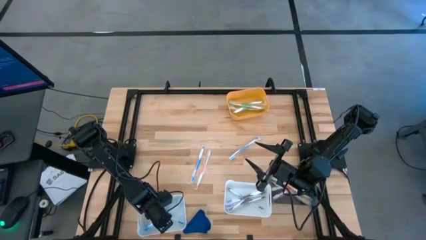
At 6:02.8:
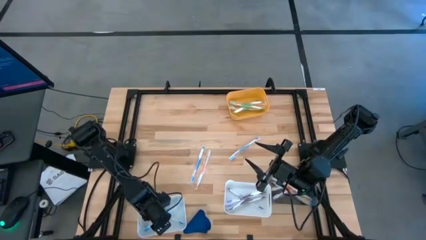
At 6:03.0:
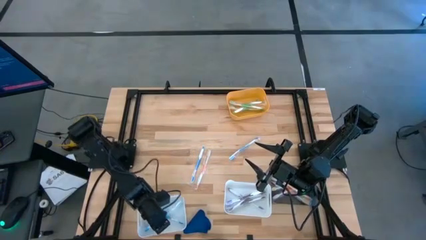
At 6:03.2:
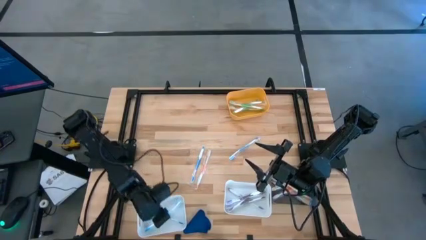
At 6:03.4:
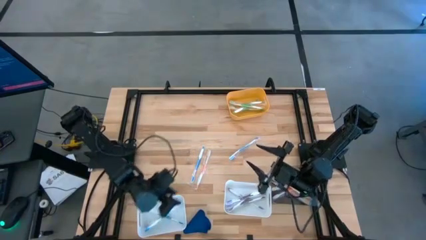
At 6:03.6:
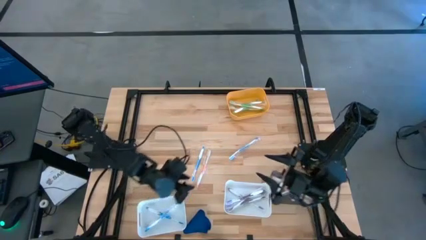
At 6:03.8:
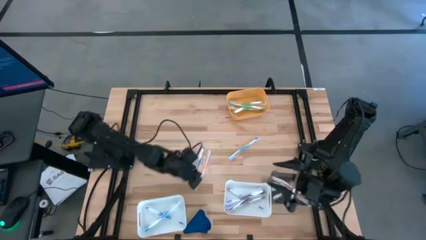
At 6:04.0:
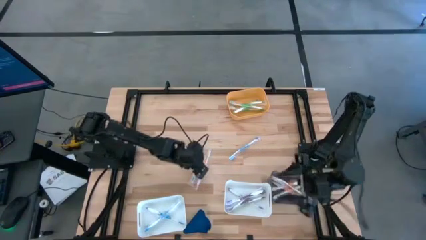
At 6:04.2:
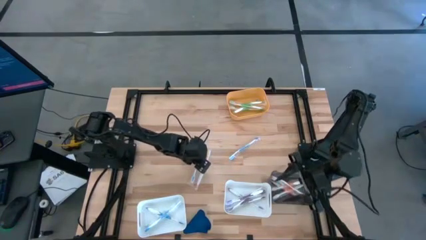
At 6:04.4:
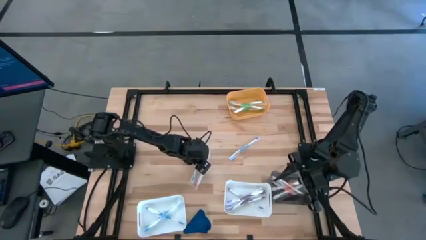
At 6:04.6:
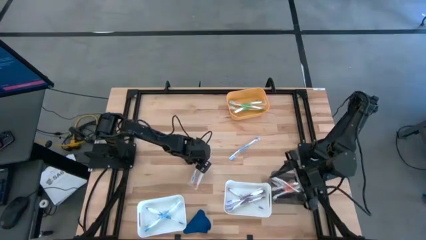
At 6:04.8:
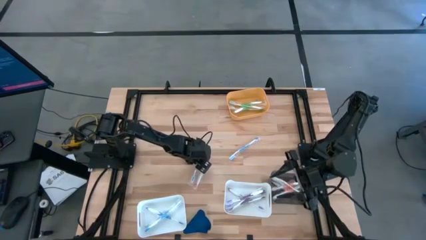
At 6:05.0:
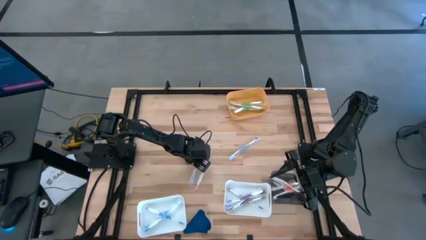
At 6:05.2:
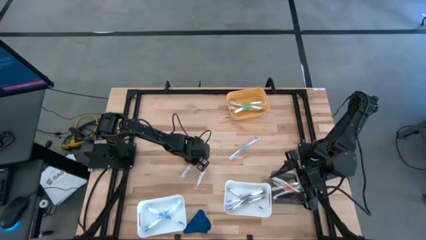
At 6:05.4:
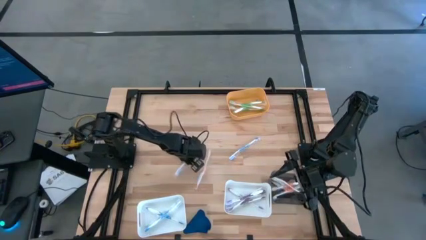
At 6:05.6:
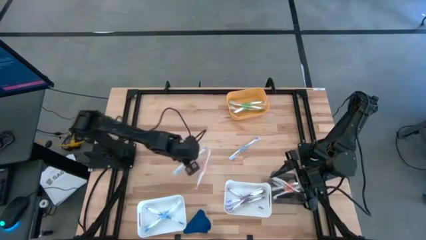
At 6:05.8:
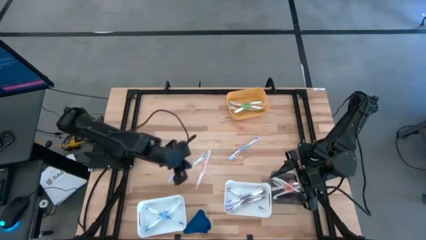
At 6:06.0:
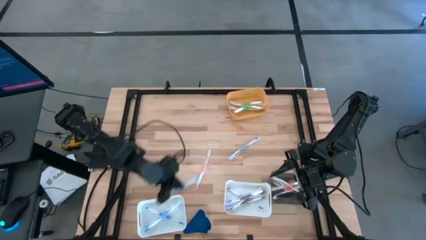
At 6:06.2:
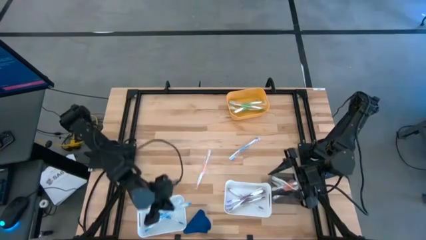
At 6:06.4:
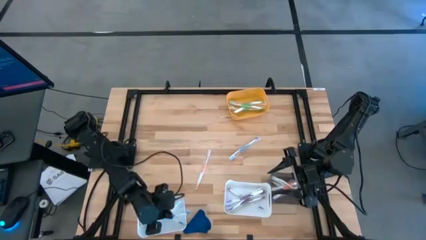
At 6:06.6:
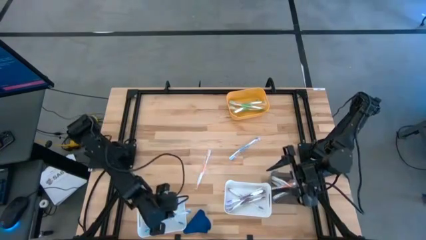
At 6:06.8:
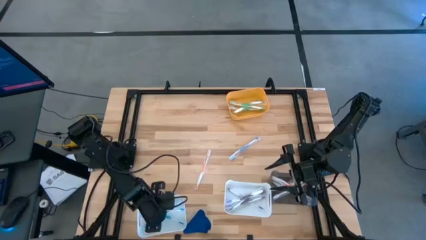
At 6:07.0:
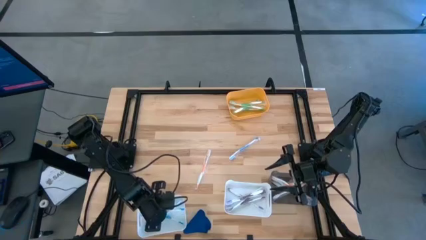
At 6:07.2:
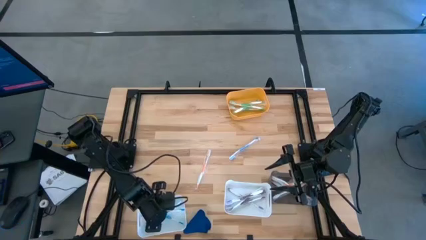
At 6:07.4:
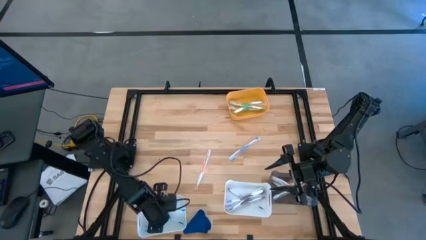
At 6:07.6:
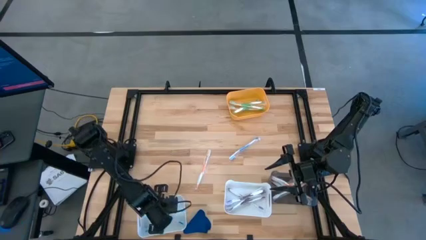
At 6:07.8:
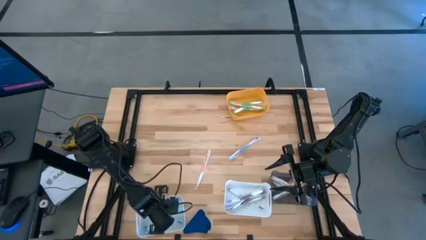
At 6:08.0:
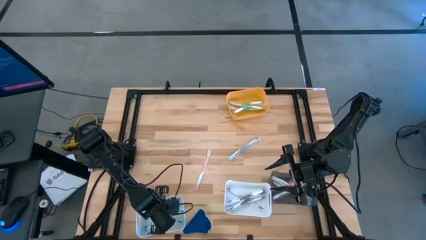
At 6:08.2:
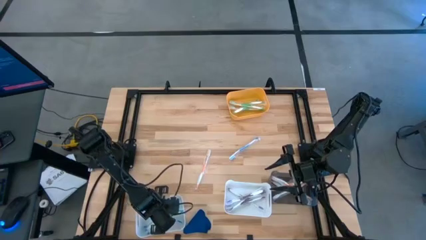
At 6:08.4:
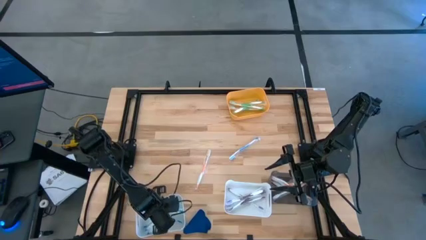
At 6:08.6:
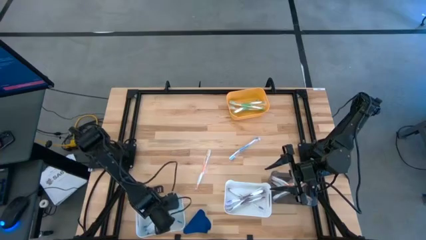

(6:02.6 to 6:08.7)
Task: Pick & Place Toothbrushes
Put the blue toothbrush into the left white bin

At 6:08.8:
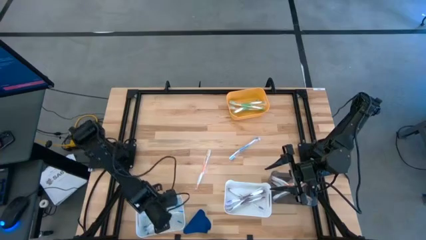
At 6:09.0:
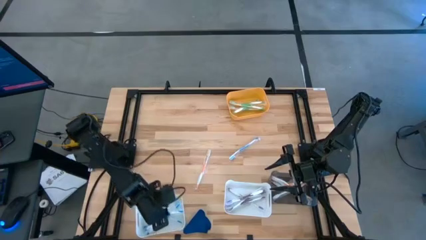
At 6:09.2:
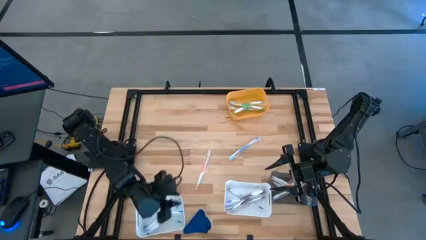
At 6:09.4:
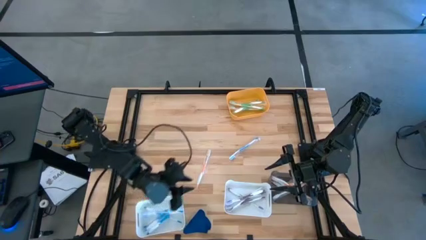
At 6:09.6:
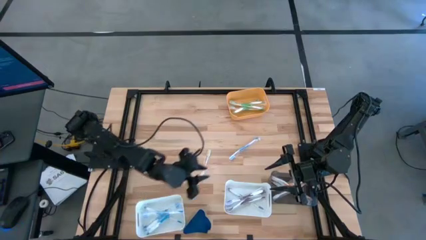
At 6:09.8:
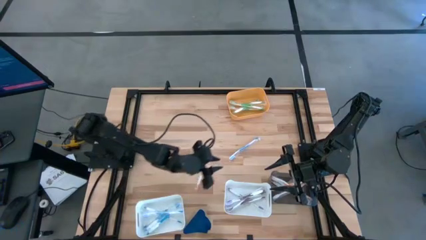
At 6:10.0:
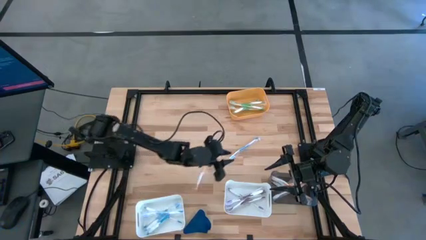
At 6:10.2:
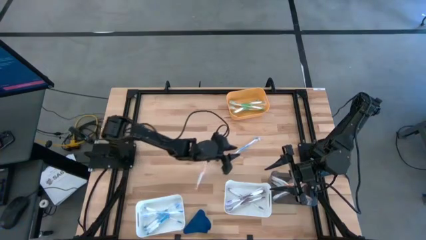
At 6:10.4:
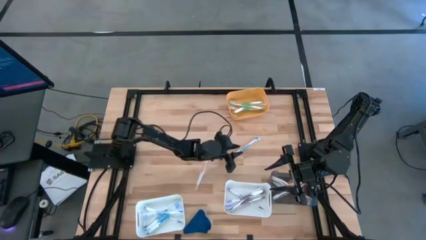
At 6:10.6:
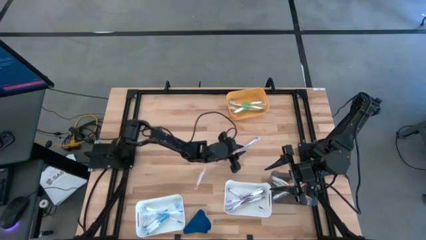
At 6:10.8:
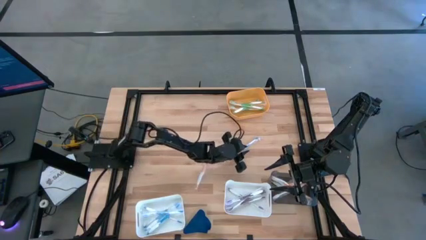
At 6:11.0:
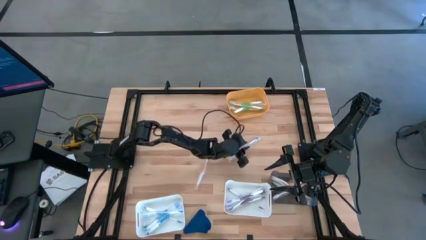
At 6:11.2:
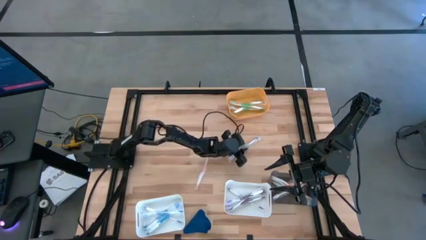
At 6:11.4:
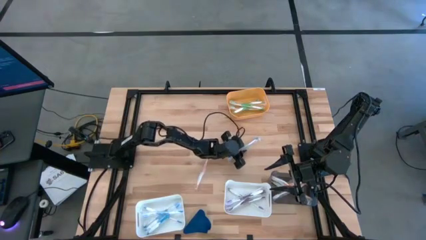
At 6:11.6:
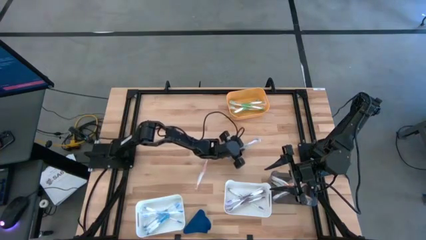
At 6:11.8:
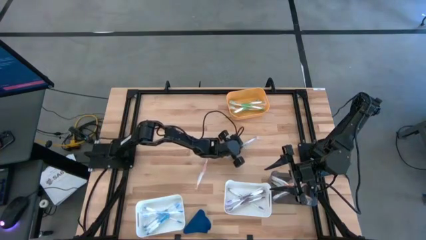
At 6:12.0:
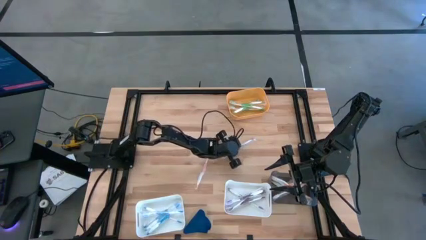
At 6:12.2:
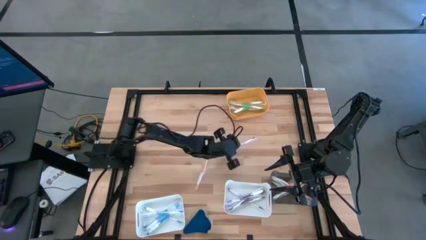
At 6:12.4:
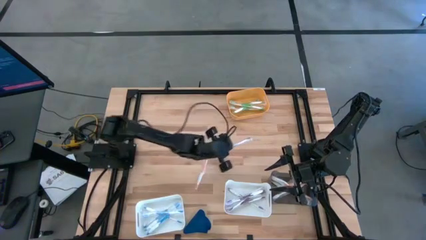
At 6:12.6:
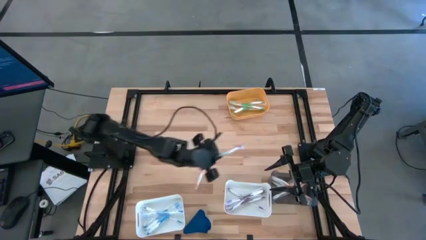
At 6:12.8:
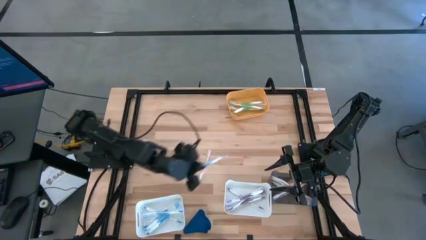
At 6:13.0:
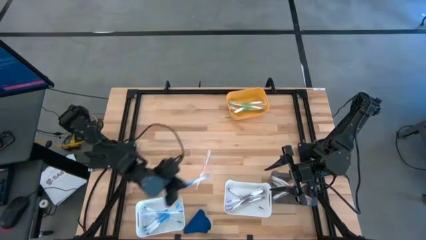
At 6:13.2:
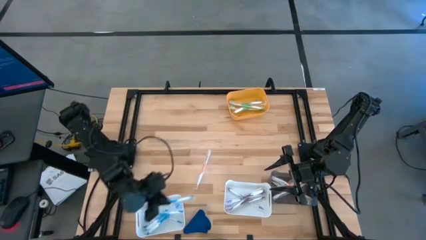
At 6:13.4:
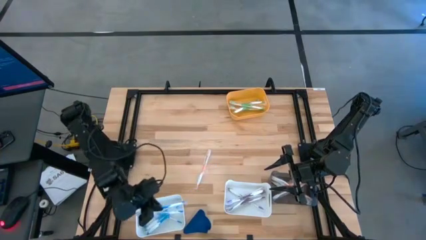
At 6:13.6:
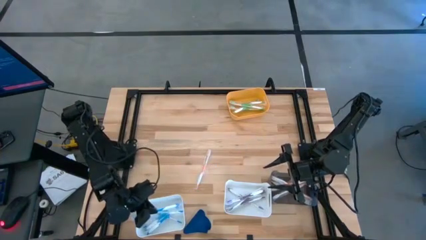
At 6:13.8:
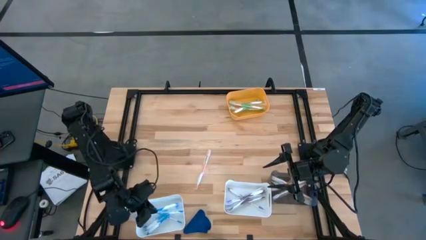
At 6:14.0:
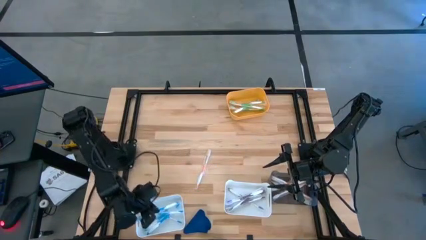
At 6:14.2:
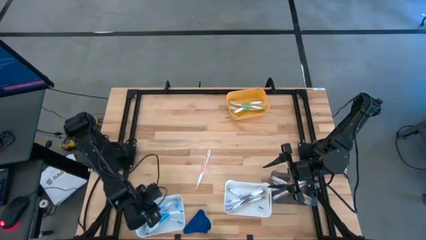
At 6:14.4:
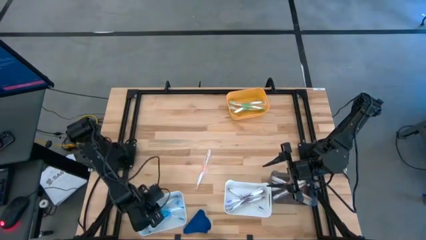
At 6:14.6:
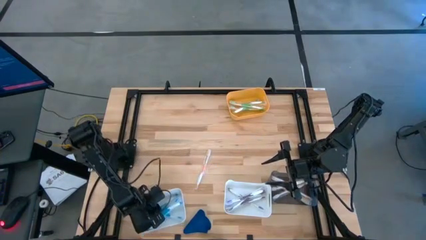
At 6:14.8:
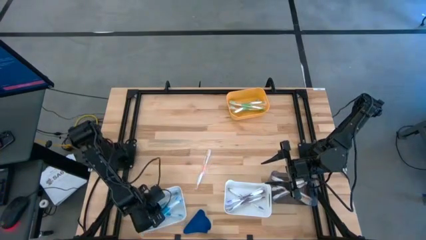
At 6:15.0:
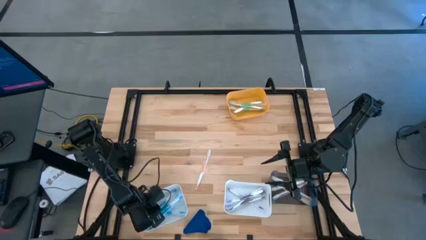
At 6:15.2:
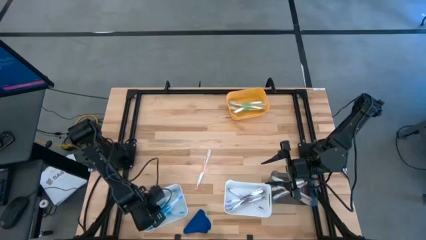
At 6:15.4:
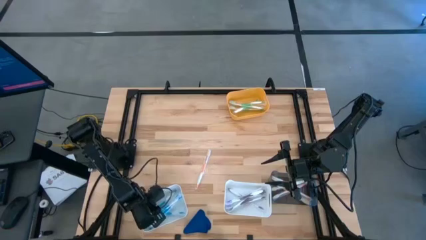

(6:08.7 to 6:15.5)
Put the blue toothbrush into the left white bin

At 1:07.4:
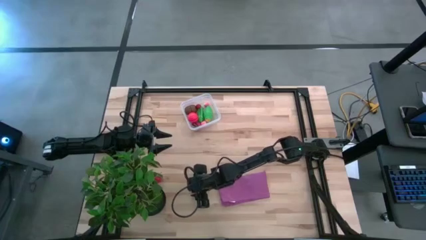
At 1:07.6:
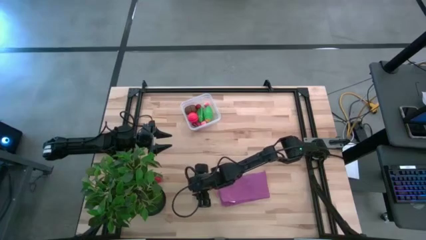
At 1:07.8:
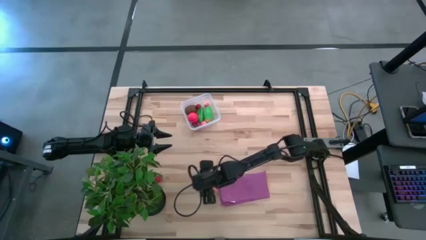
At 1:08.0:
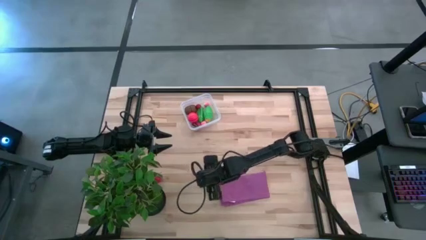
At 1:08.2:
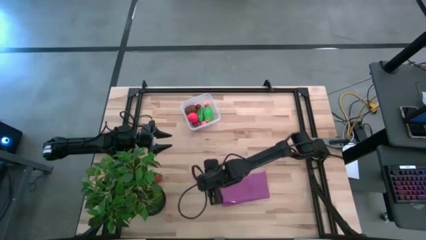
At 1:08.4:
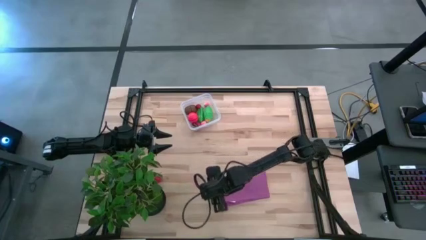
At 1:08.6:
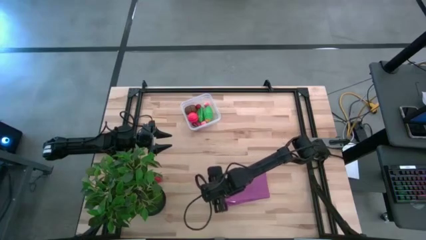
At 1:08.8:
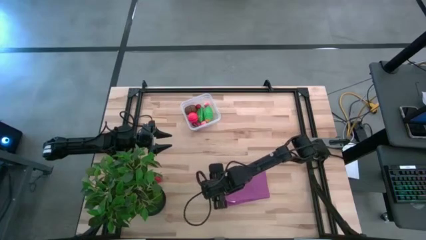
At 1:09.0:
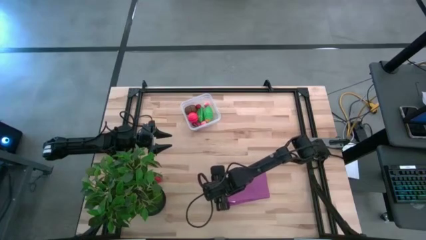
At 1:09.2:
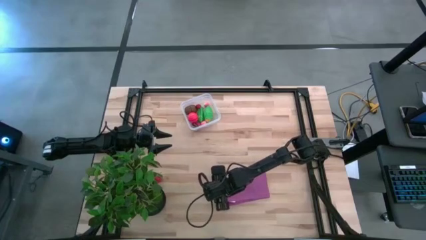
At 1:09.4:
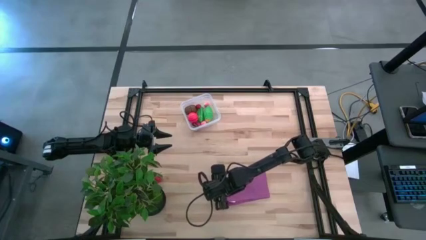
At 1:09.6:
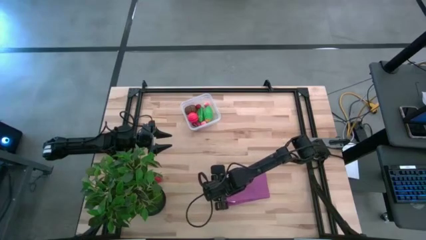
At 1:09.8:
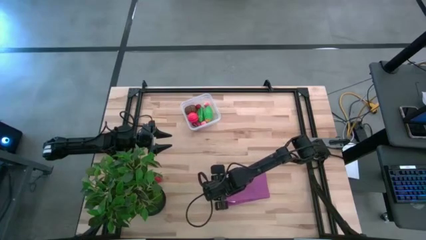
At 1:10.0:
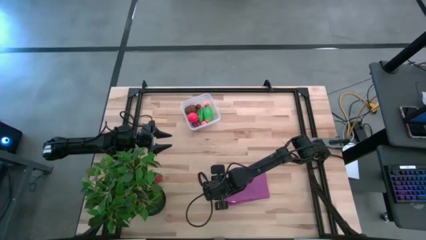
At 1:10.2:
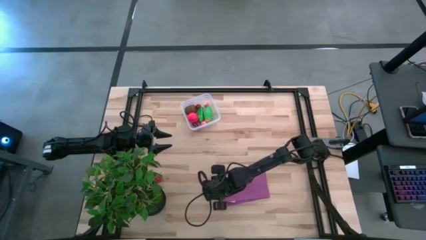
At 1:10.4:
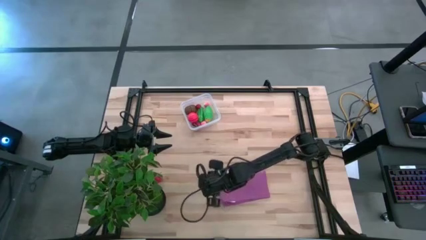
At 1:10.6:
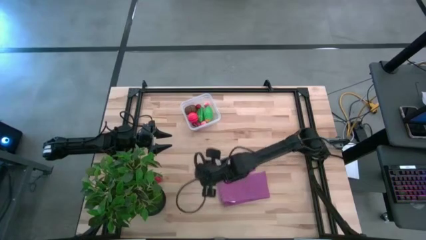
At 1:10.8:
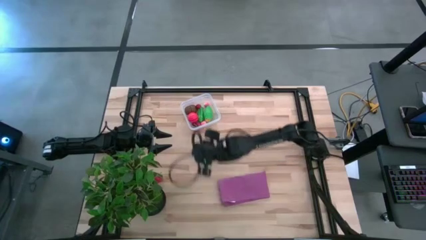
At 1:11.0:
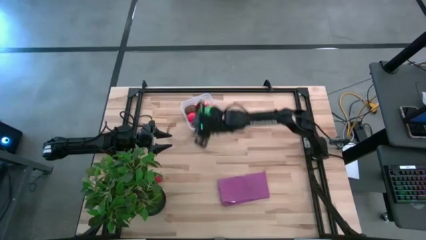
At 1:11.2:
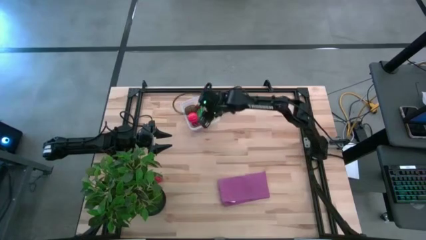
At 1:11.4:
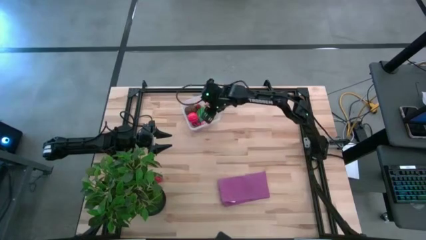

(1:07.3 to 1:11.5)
Task: Pick and placing Produce into tupperware
Put the pink peach into the transparent bin
